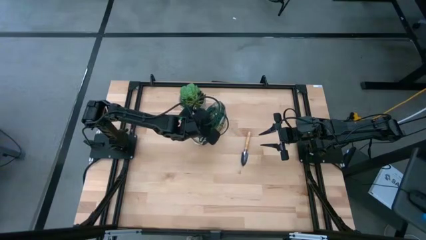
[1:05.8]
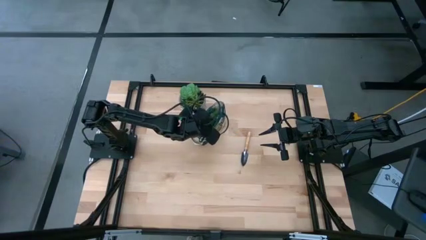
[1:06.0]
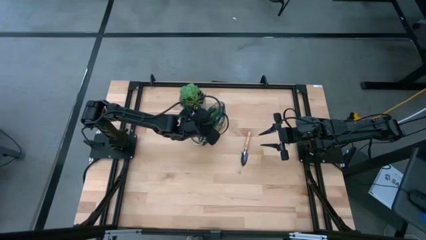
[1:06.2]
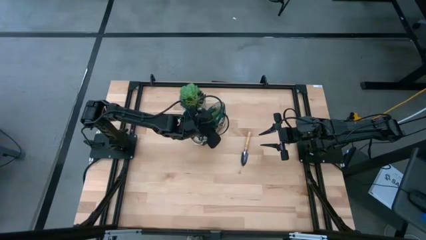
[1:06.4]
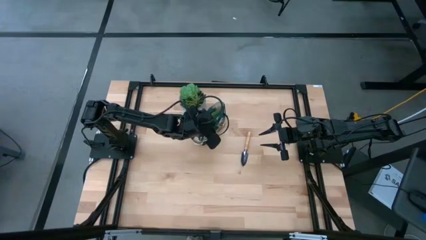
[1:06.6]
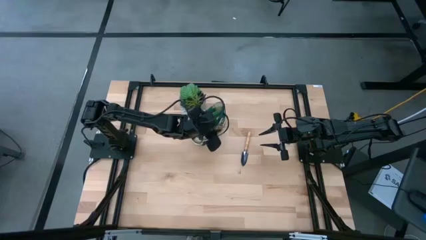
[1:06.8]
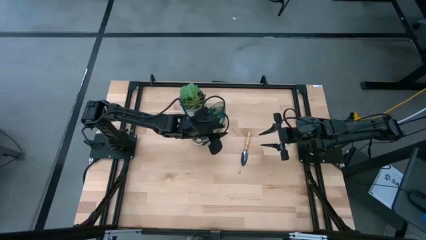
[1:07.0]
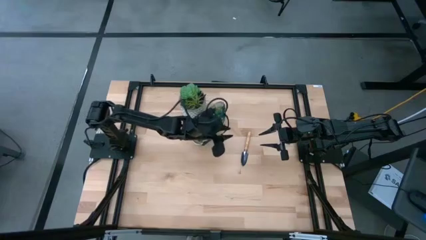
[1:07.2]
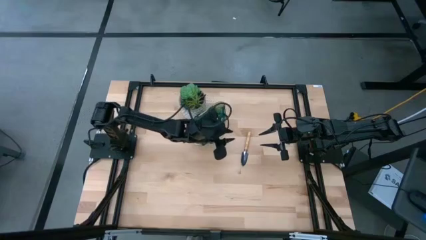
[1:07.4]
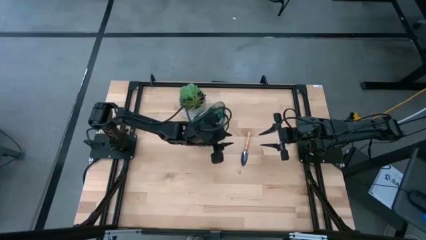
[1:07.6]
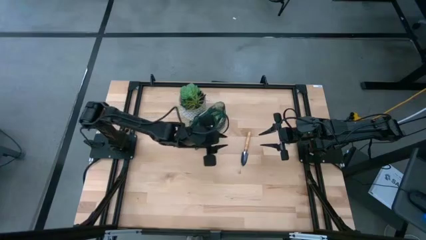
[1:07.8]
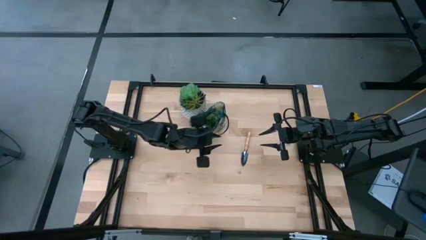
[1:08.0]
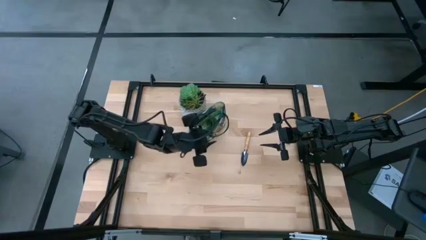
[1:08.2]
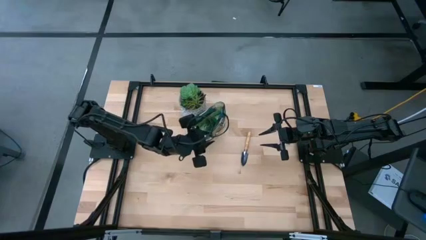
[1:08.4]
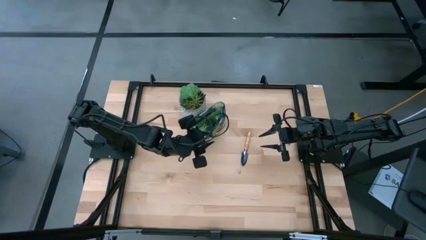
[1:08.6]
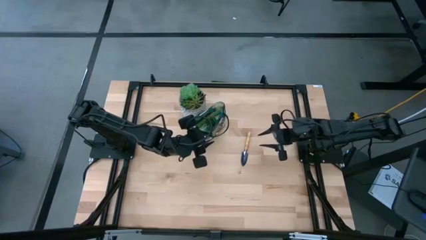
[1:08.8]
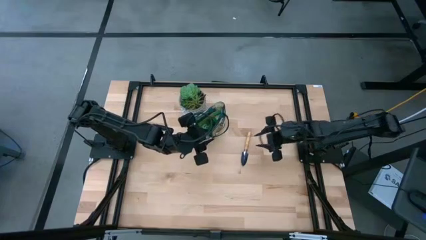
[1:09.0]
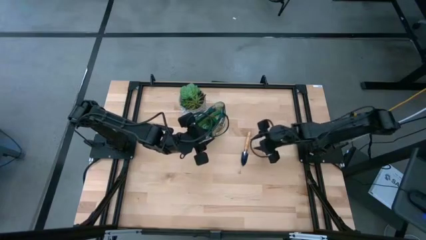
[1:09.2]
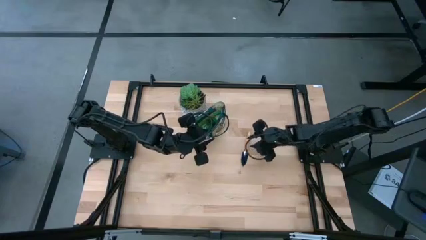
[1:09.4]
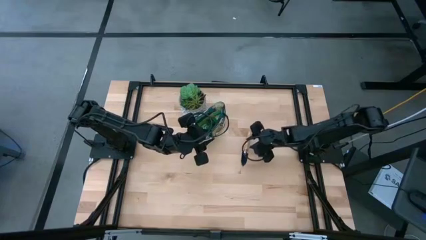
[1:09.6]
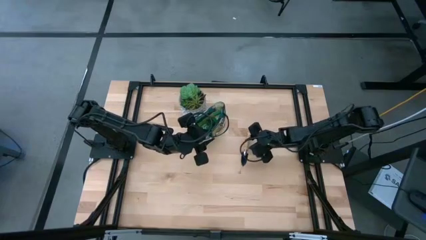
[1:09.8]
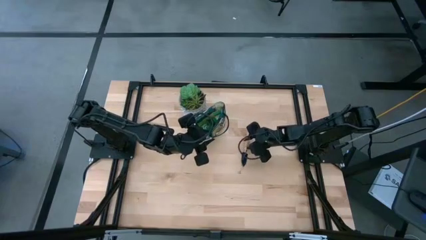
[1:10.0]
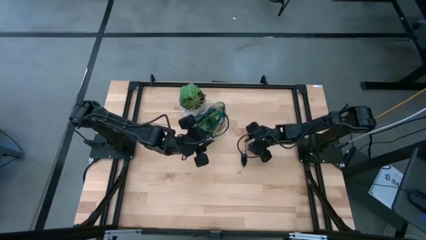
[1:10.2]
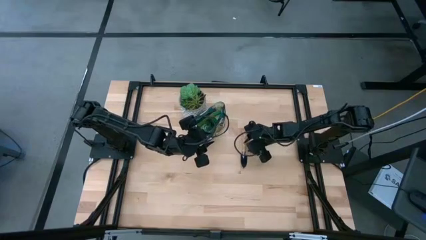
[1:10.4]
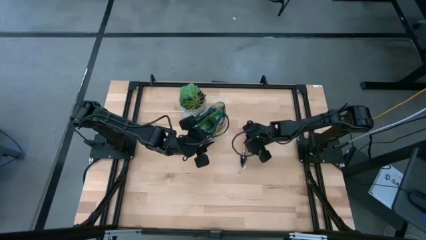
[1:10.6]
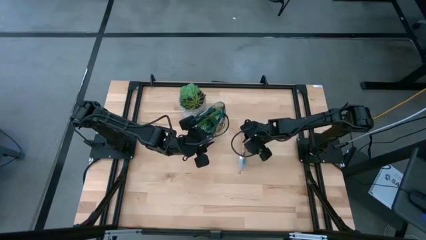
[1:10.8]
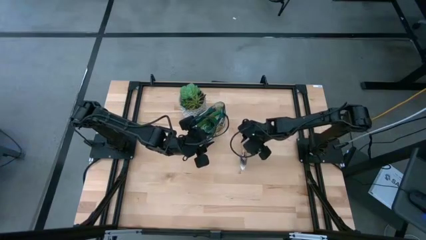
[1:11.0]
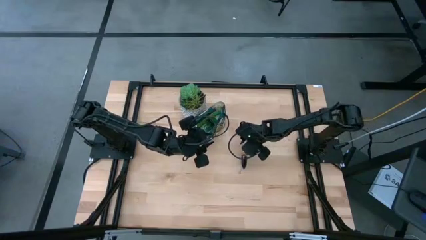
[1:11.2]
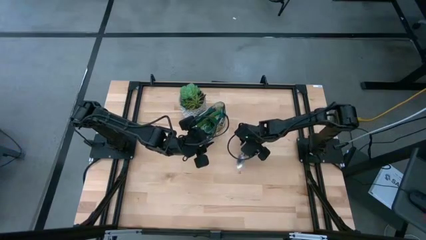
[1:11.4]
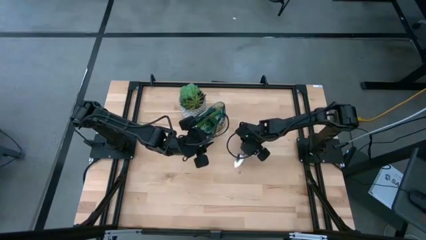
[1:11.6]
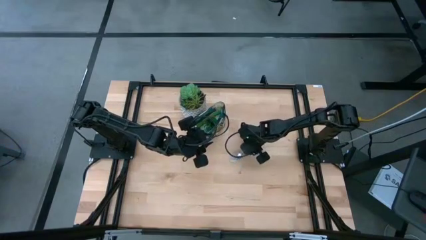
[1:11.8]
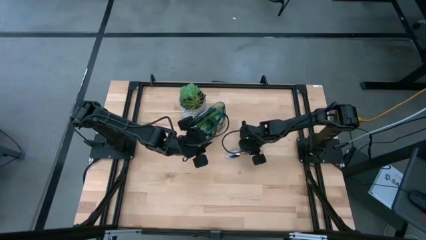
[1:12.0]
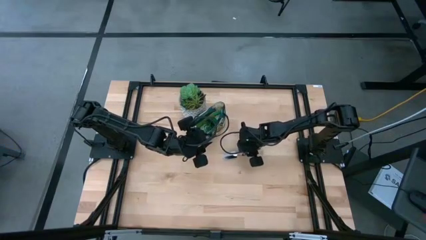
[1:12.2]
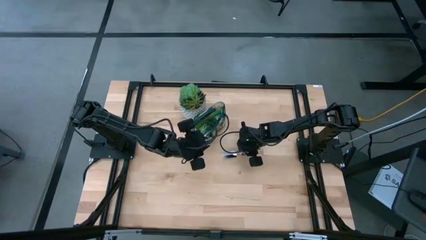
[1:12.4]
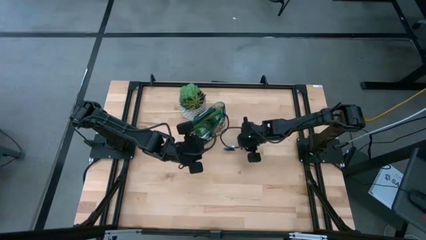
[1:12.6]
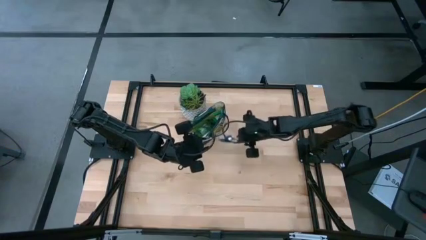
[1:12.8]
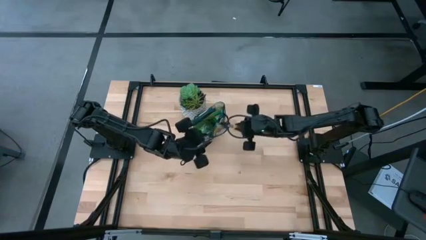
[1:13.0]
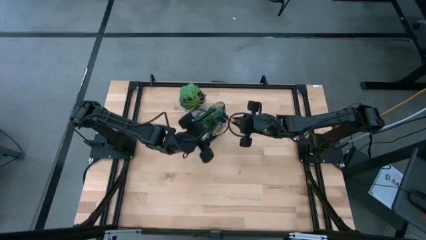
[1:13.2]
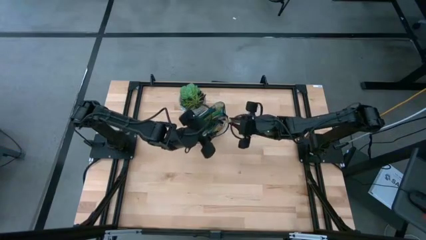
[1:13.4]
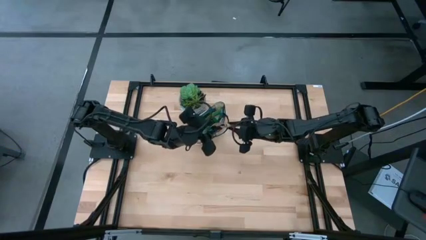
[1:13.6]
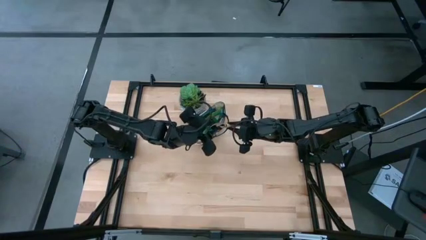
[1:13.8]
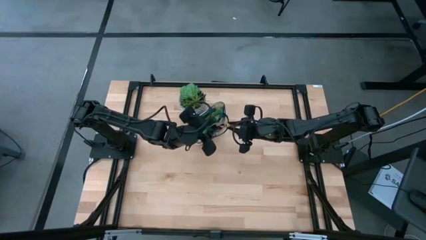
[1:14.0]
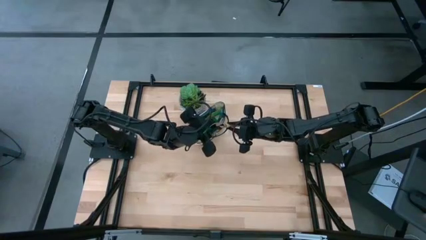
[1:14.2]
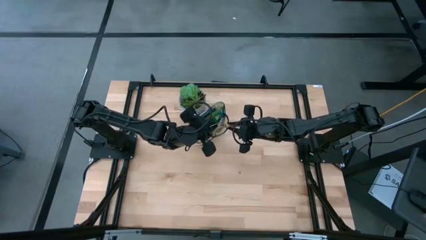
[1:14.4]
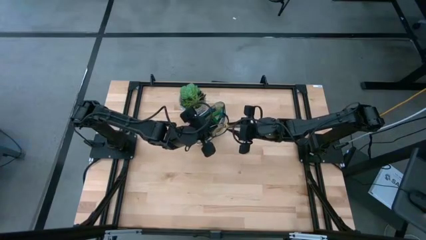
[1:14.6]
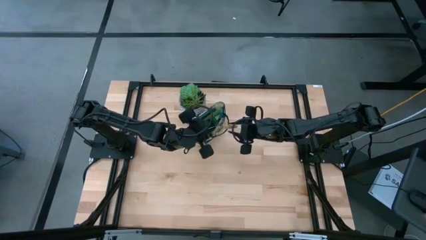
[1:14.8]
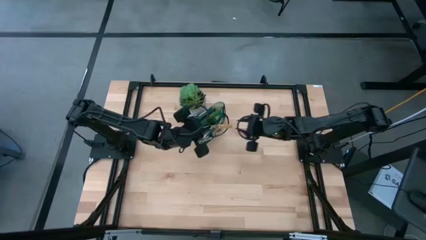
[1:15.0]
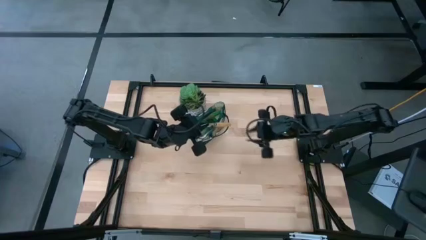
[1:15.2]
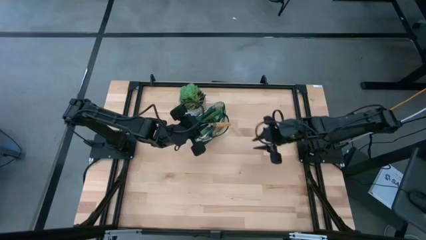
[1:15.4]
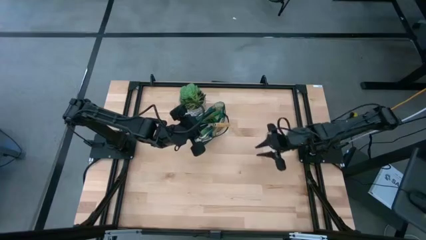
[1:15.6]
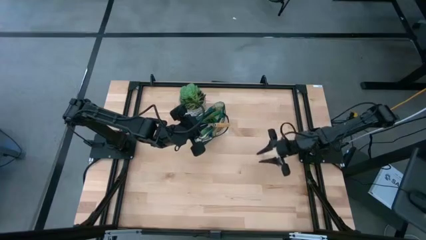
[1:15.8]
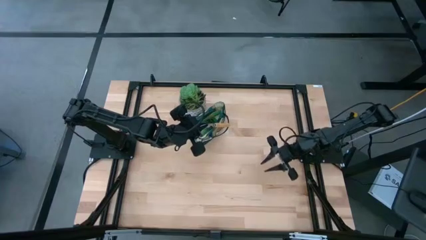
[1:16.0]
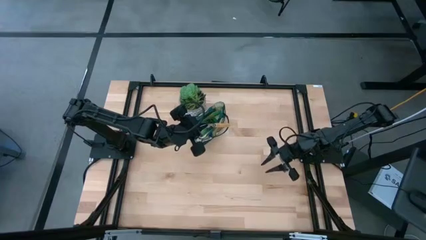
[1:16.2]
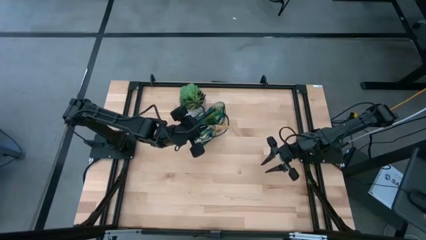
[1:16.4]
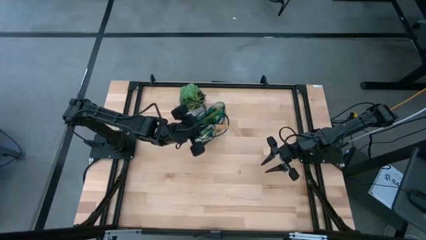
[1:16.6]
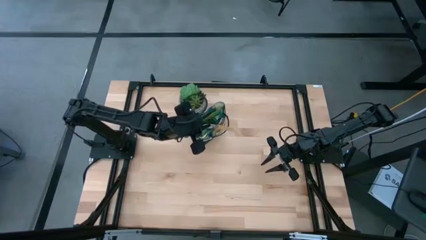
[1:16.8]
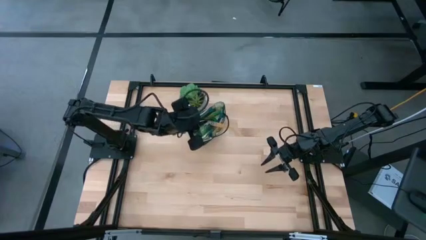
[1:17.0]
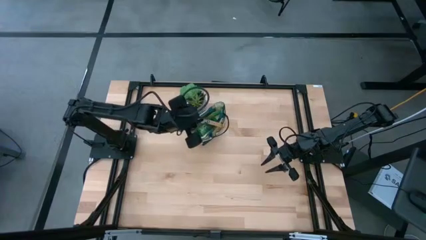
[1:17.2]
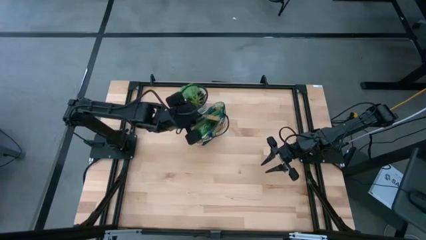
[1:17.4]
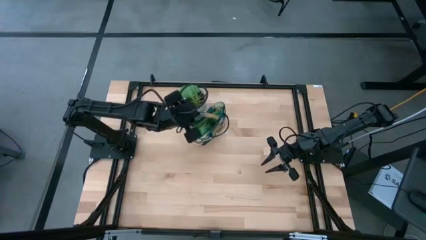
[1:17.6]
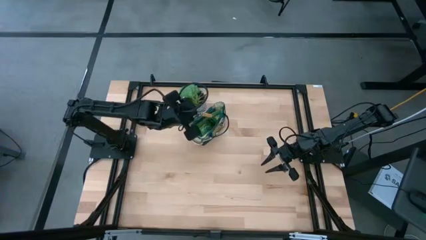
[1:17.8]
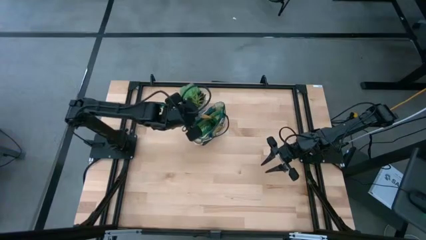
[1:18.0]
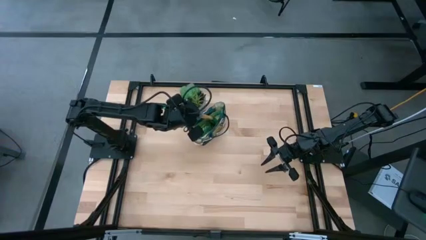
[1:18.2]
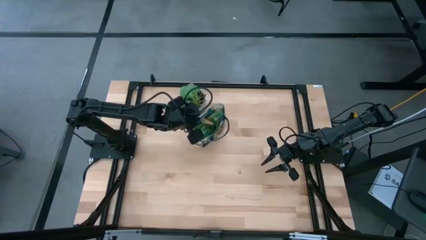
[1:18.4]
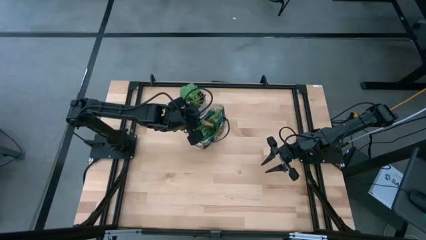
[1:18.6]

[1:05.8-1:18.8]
Task: Pick & Place Garden tools in Gardening bag
Put the brown trowel into the white gardening bag

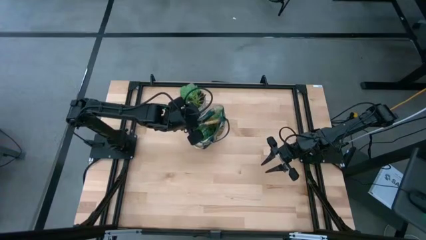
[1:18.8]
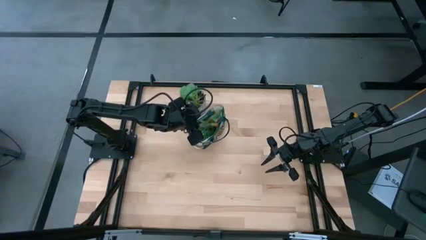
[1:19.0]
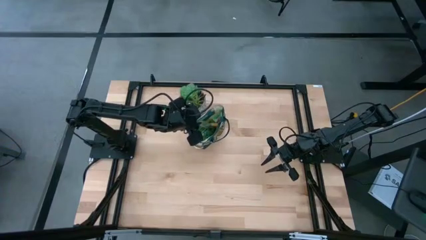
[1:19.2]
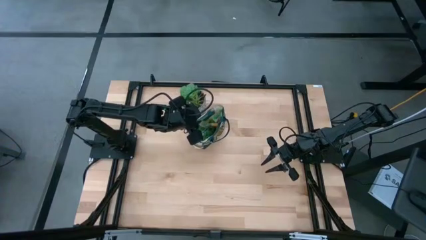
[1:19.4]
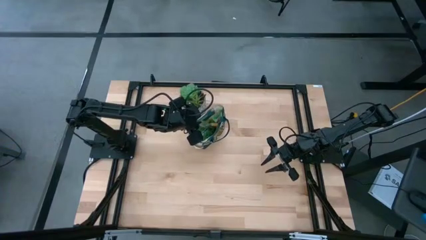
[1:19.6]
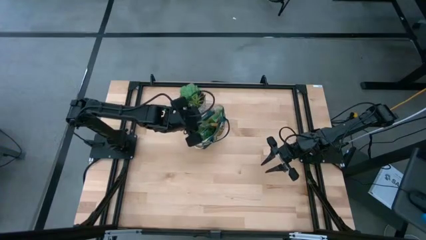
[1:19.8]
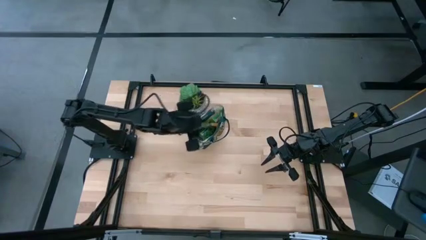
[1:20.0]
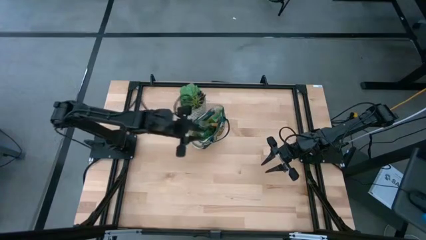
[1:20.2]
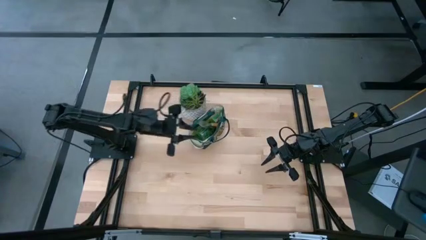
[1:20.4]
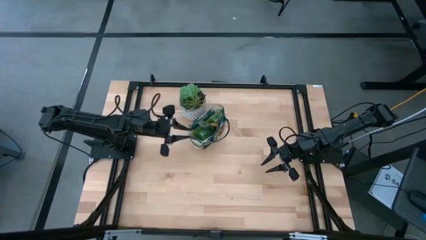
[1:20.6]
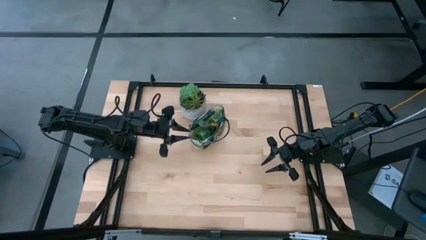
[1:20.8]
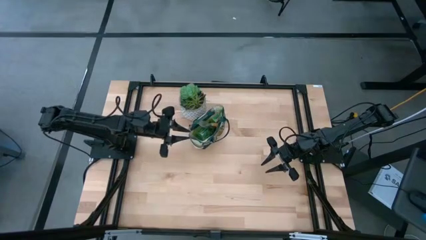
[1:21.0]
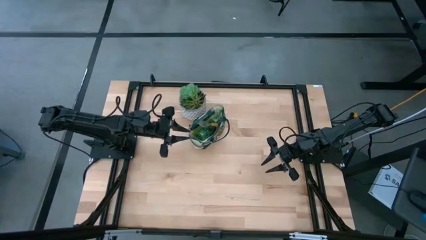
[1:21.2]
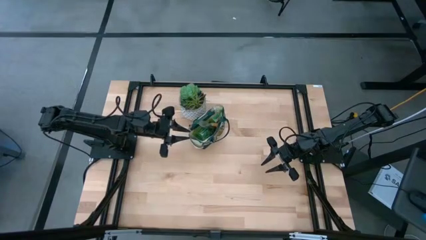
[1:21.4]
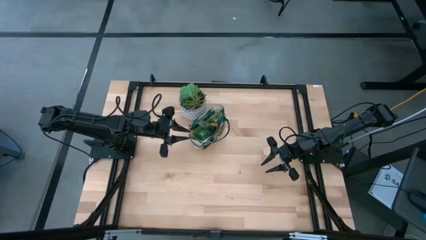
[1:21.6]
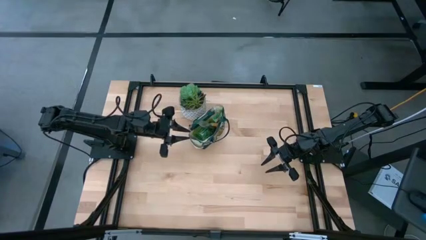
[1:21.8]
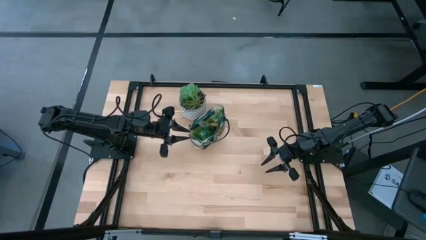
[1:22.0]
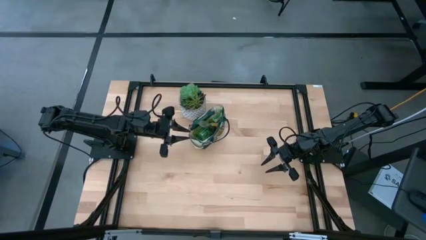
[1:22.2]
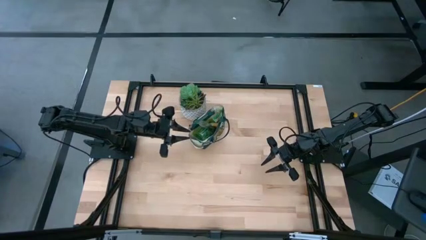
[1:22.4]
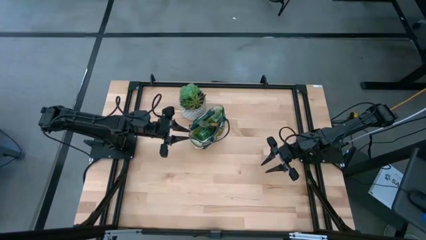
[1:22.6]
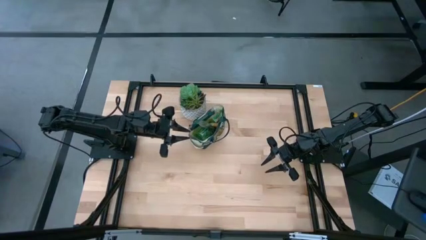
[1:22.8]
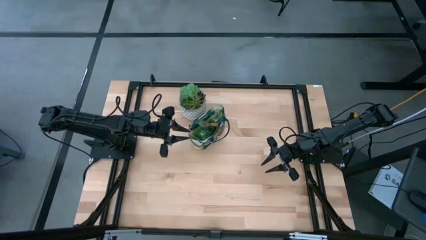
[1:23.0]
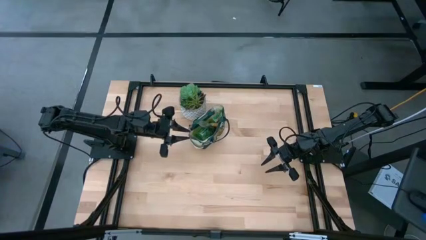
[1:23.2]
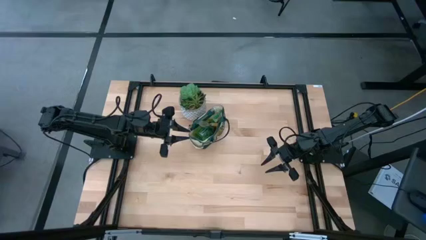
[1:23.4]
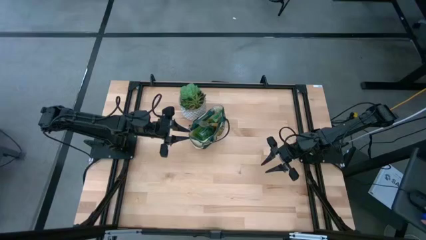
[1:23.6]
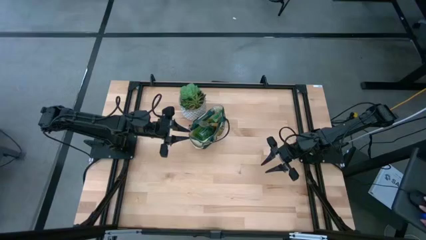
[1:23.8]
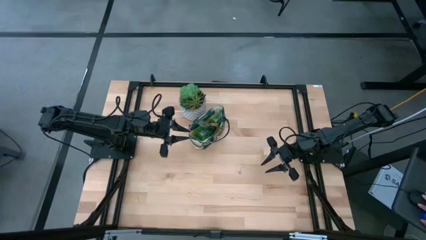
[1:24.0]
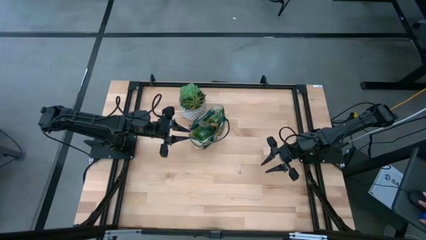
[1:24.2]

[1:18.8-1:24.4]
Return to Home Position
